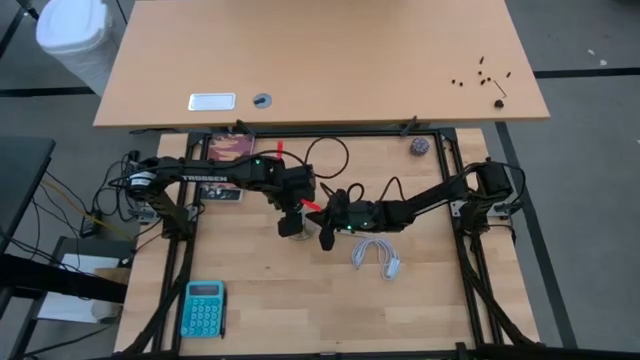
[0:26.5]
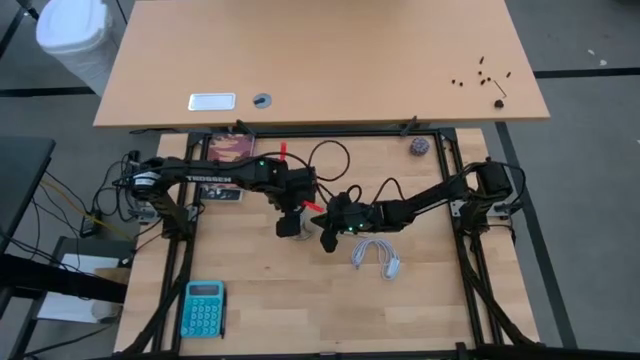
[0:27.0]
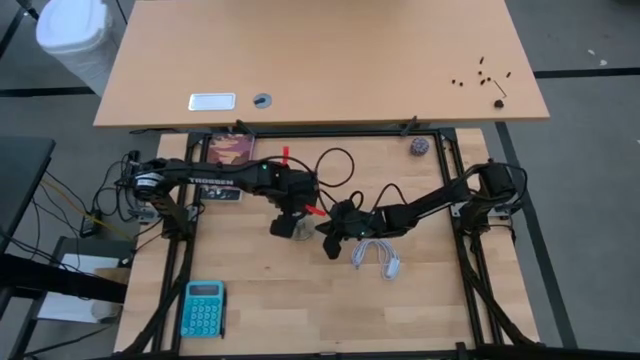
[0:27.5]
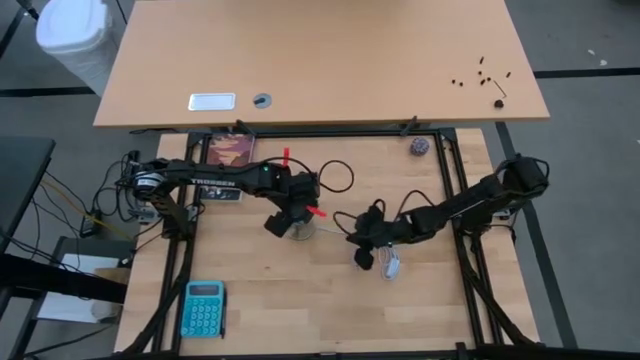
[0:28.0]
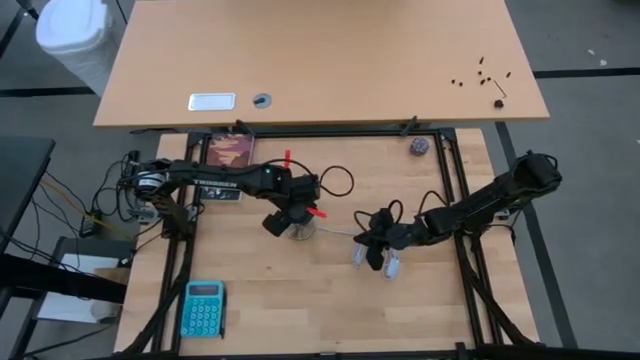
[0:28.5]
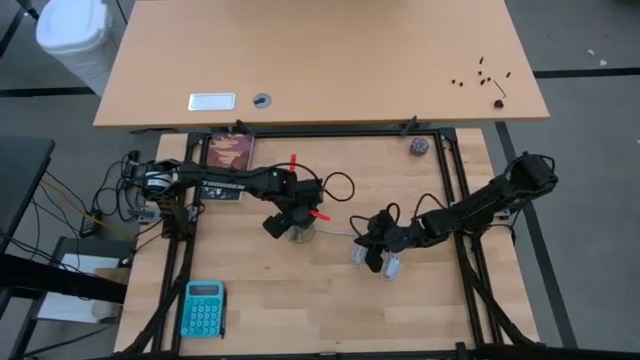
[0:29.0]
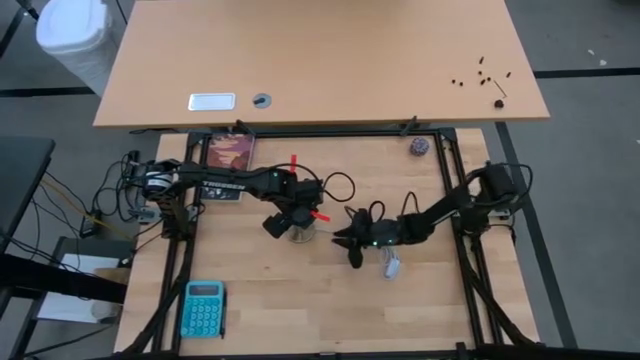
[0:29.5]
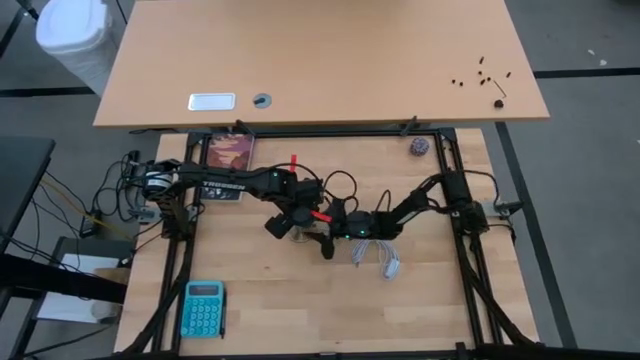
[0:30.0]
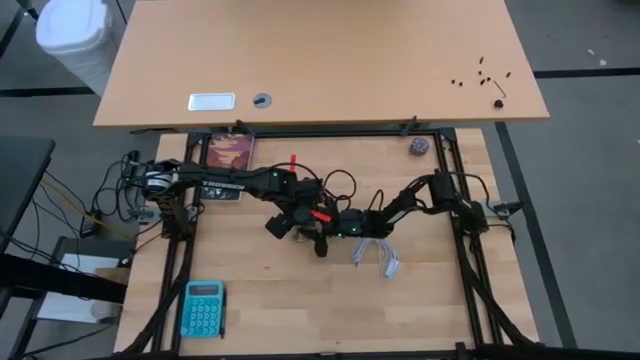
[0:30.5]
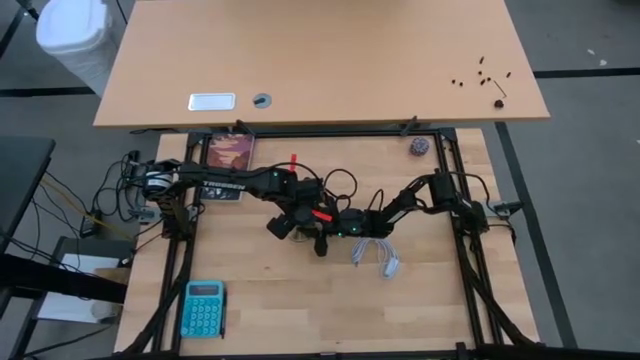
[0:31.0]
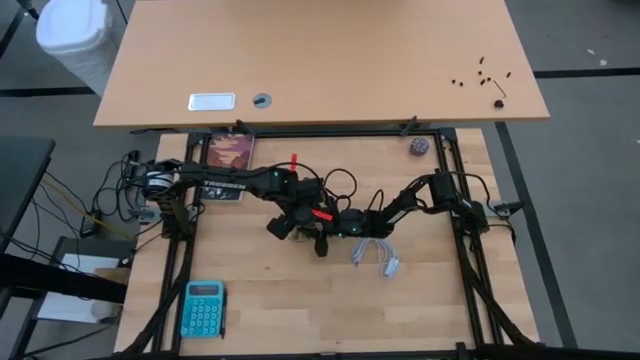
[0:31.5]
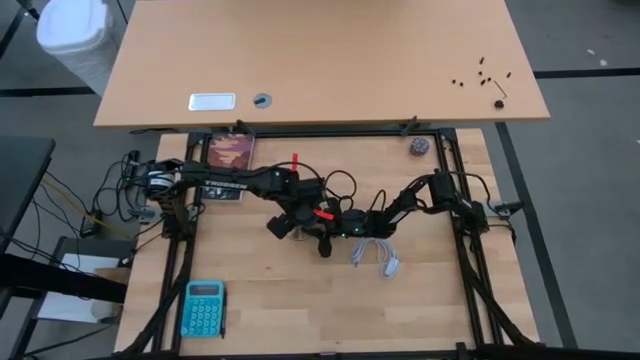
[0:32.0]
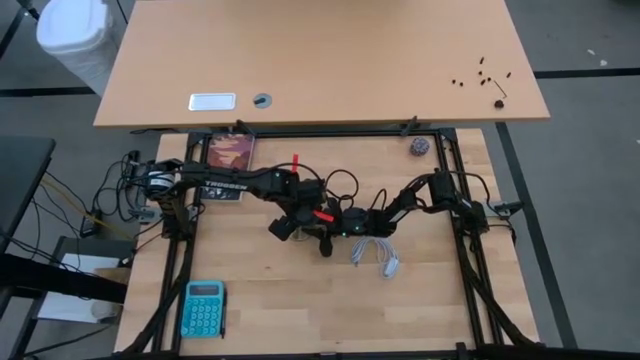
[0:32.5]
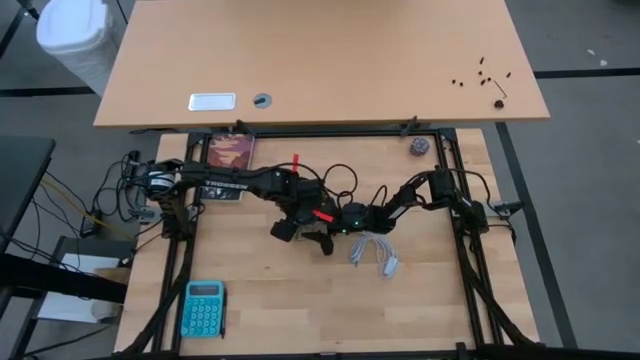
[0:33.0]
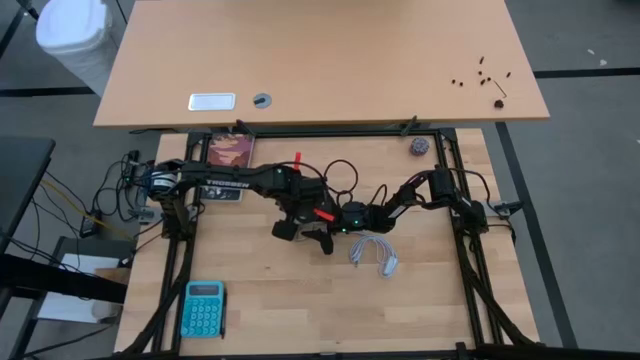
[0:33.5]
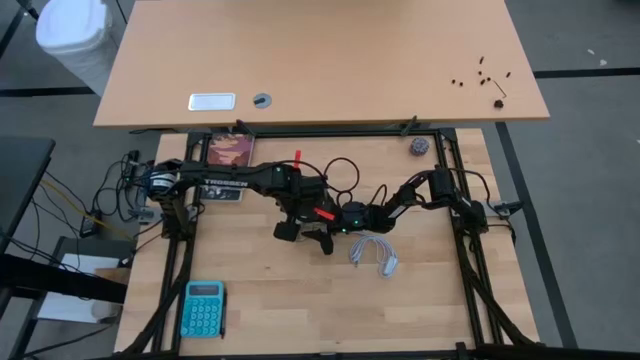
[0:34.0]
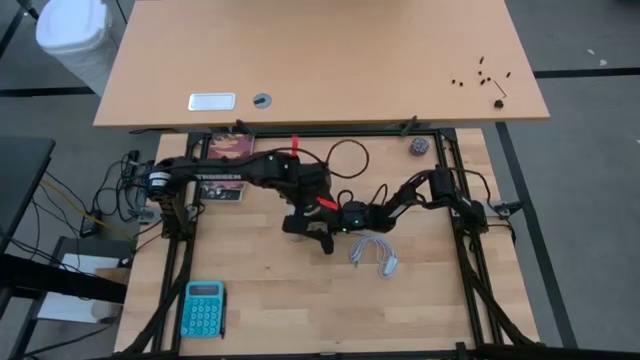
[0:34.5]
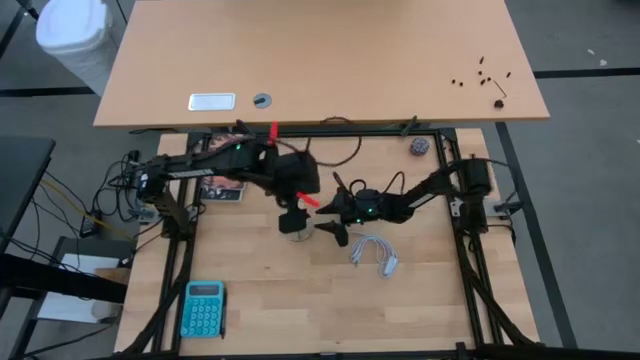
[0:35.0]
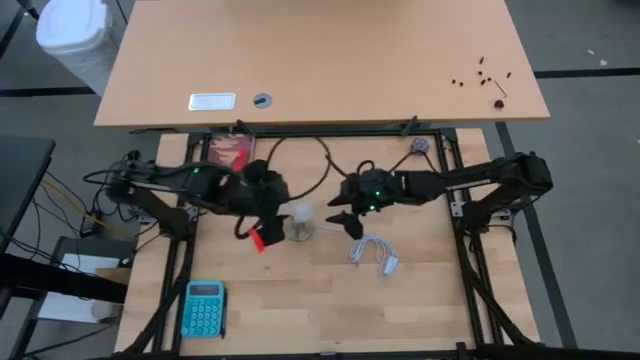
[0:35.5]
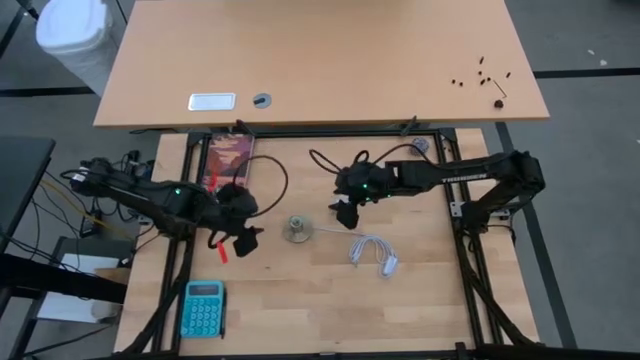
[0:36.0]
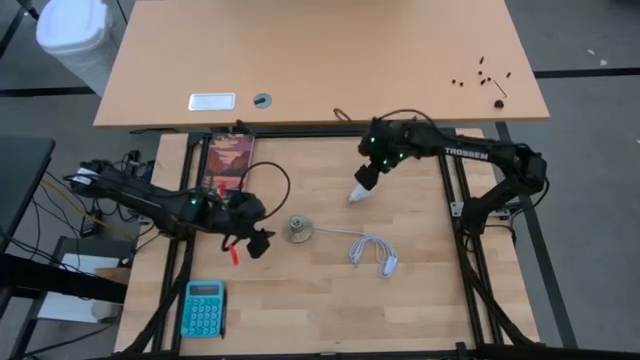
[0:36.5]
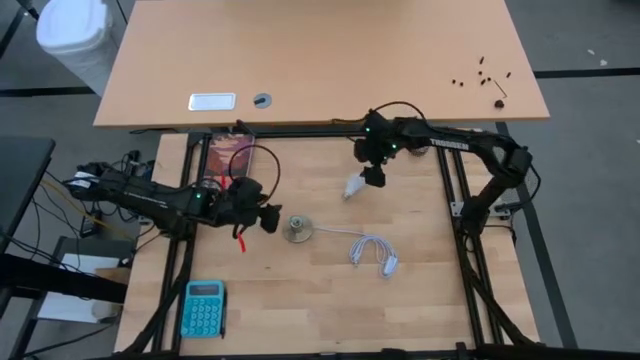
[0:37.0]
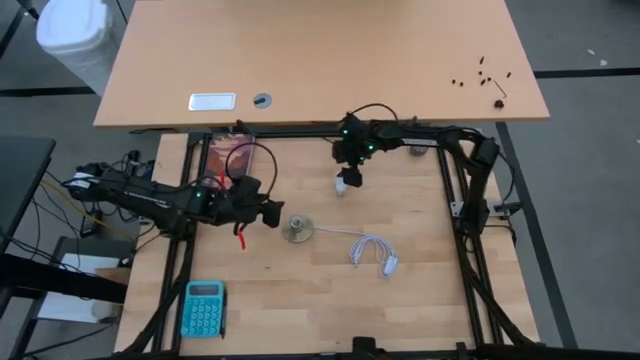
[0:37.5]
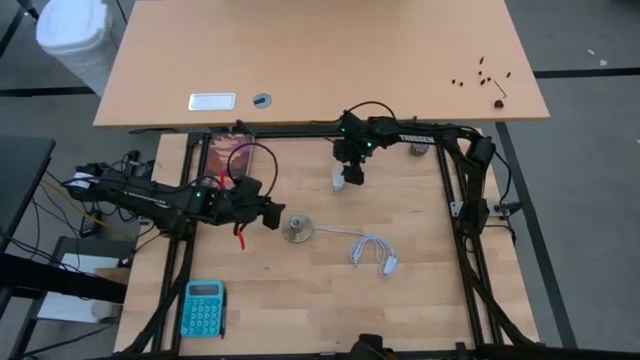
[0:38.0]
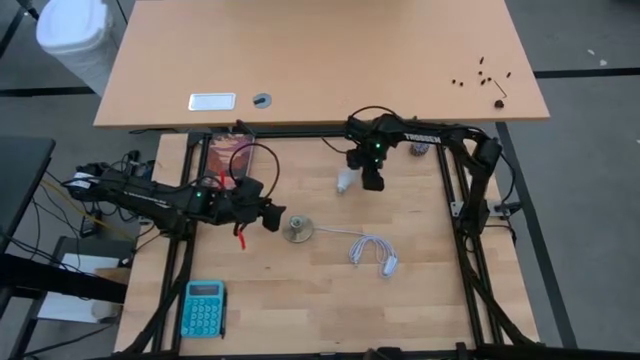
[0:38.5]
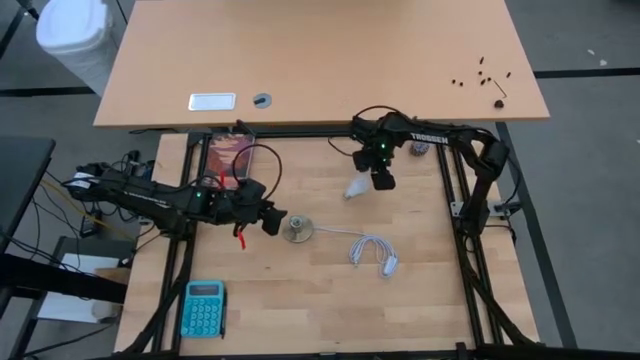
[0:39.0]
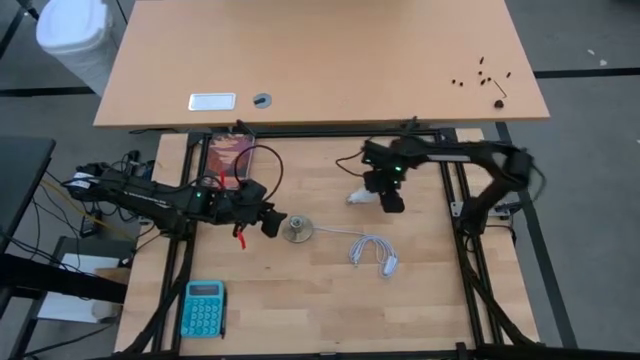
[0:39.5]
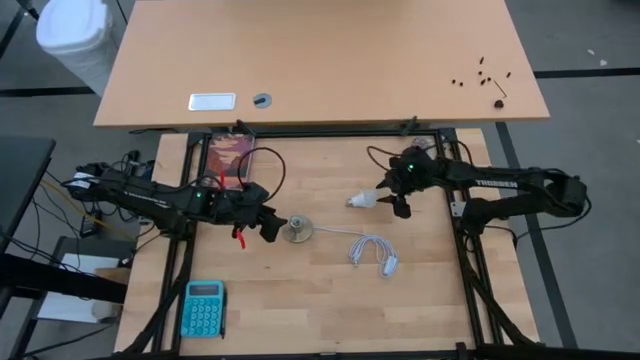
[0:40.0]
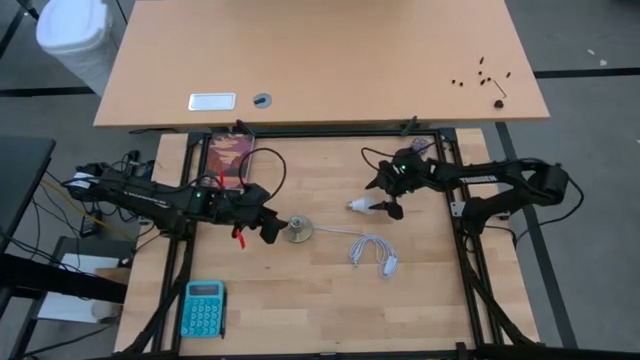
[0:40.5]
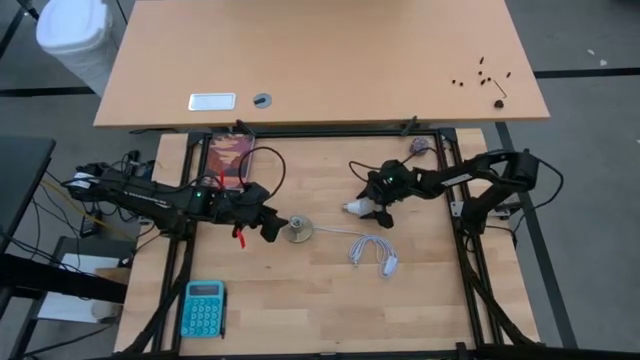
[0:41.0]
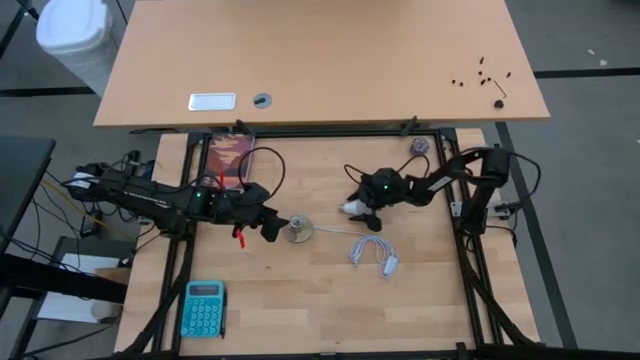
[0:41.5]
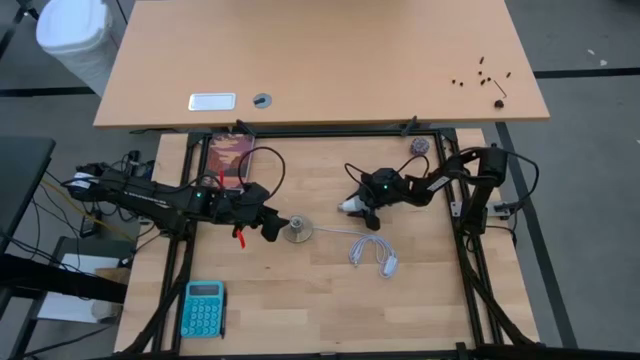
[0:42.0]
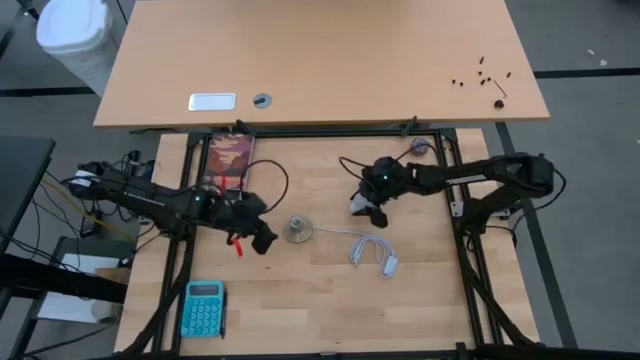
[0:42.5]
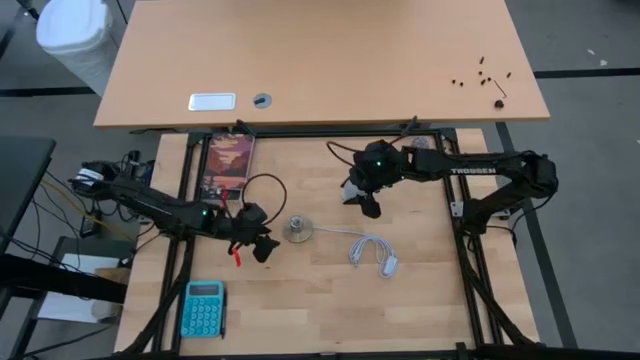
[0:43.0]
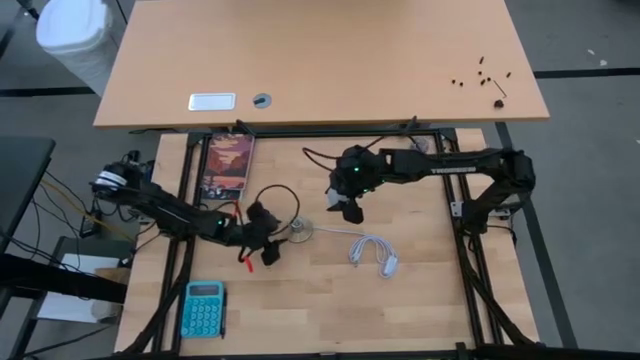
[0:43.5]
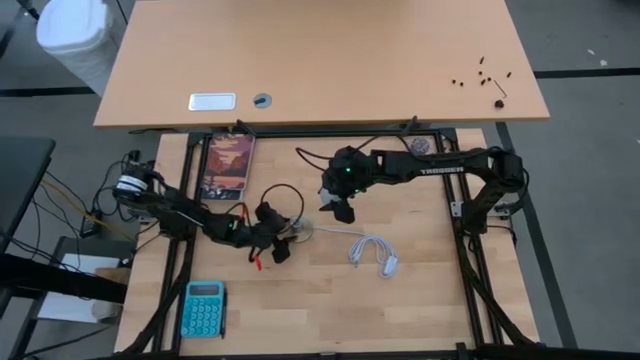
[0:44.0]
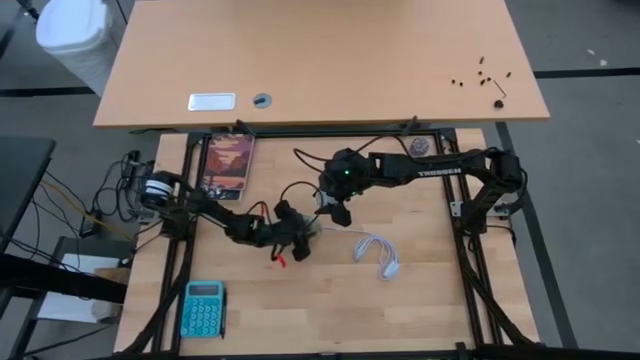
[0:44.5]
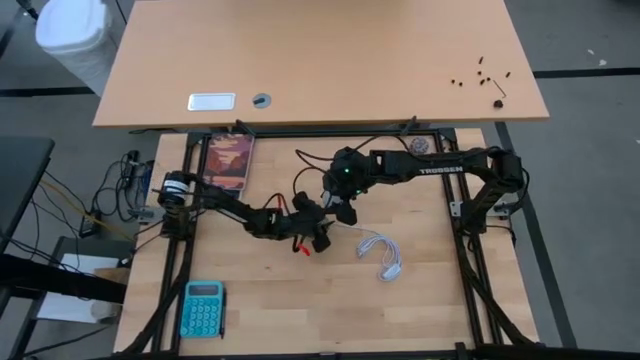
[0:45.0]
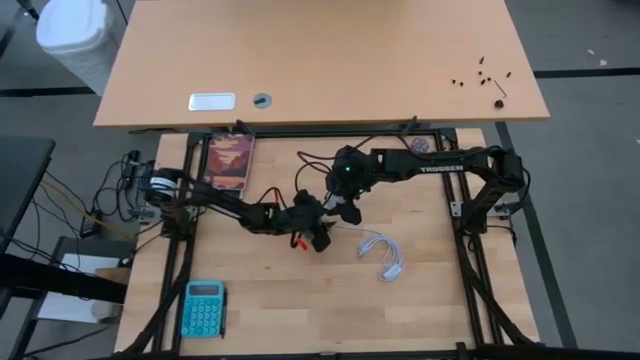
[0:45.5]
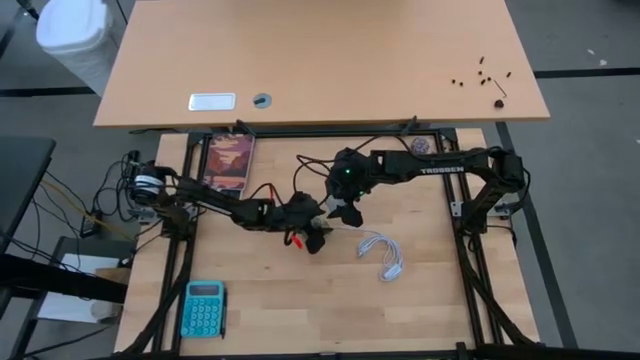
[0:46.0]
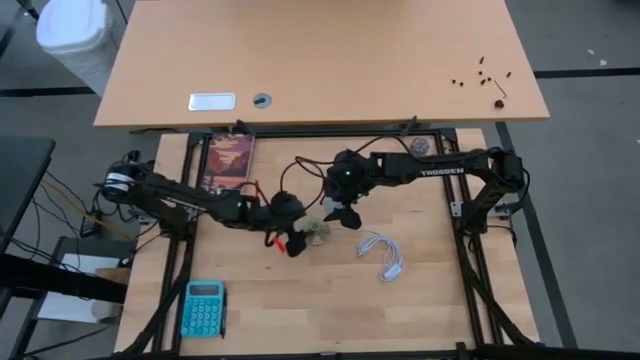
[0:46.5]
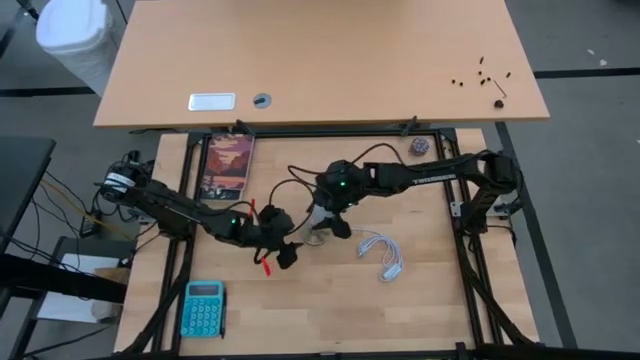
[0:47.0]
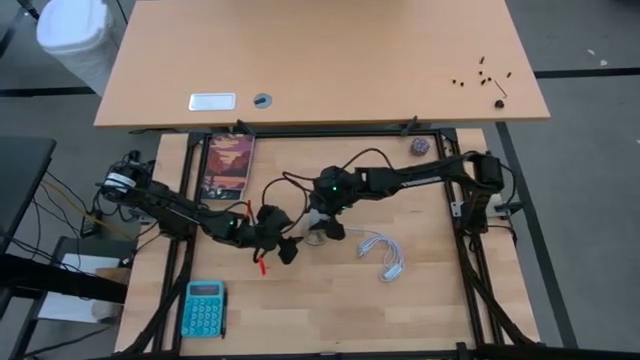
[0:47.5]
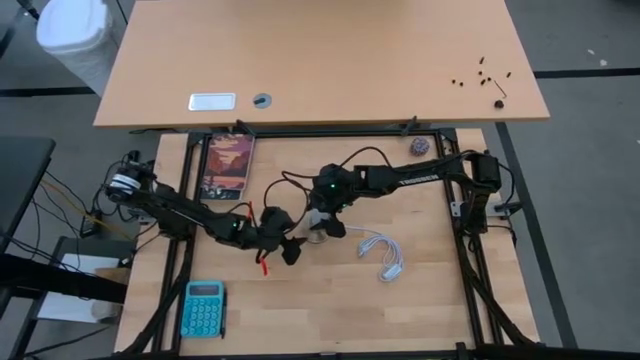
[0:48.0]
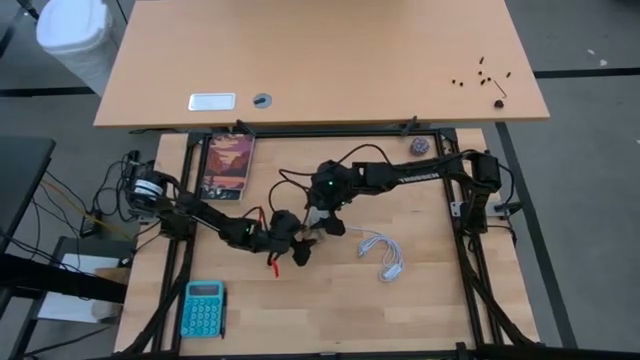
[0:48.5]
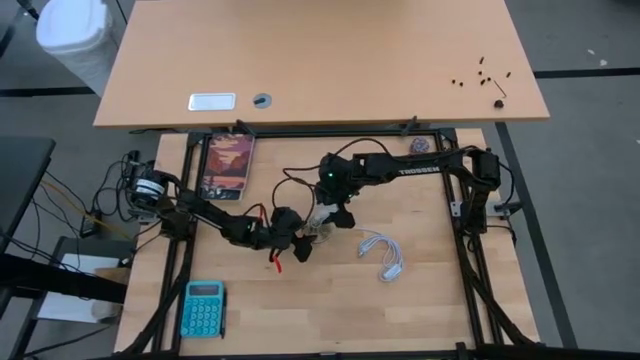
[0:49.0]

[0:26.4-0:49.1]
Task: Screw lightbulb
Insert the white lightbulb into the lamp
